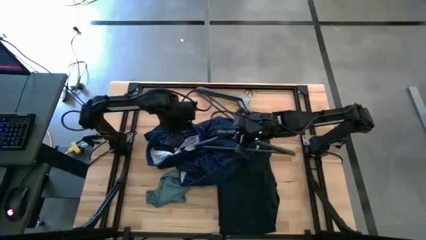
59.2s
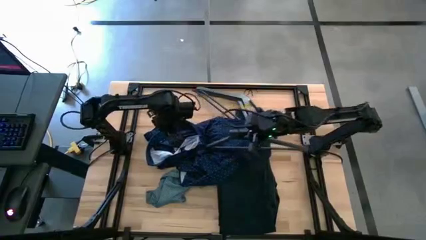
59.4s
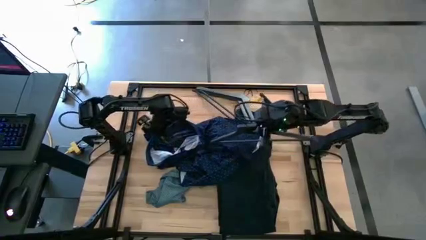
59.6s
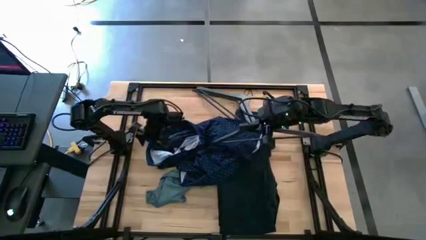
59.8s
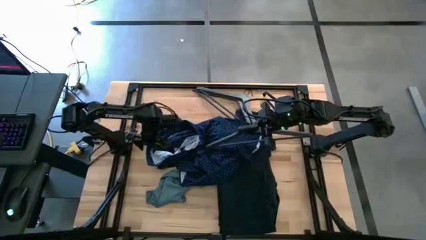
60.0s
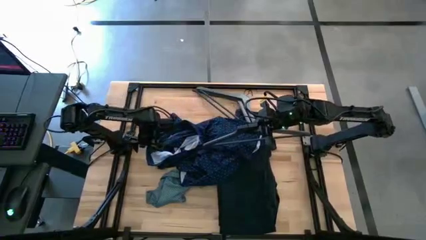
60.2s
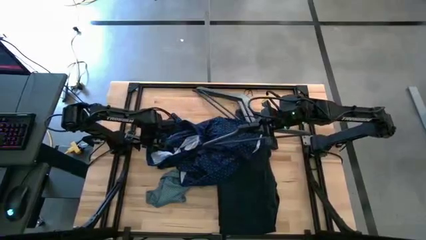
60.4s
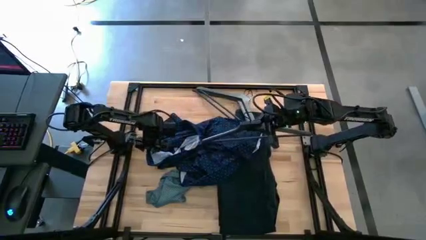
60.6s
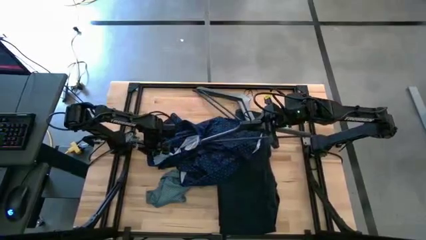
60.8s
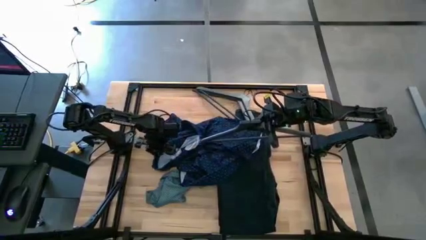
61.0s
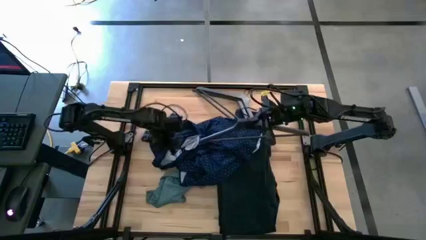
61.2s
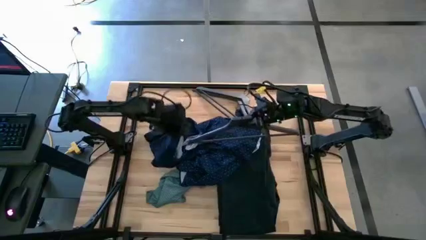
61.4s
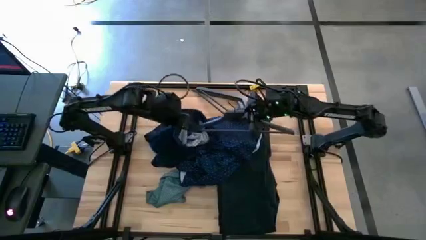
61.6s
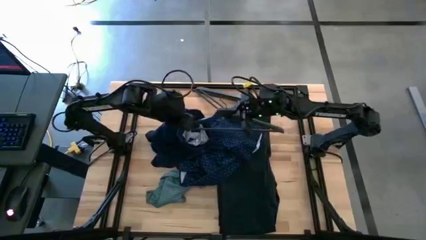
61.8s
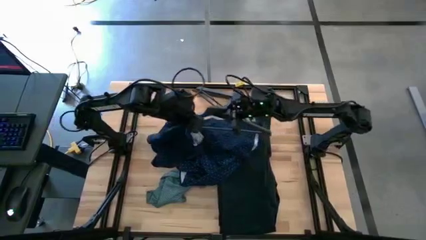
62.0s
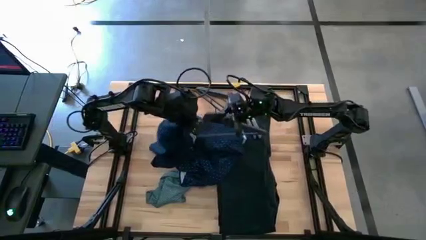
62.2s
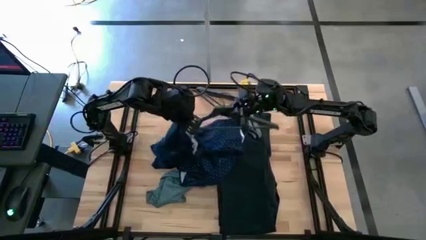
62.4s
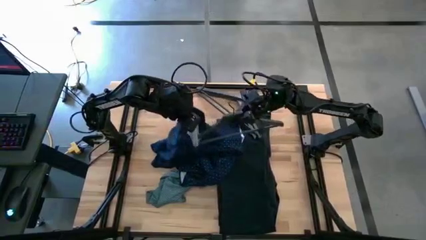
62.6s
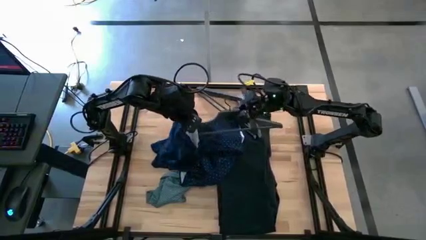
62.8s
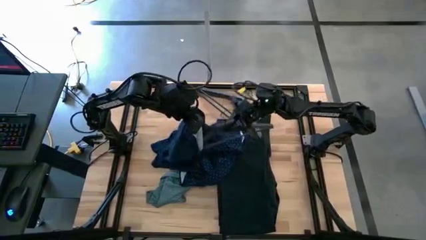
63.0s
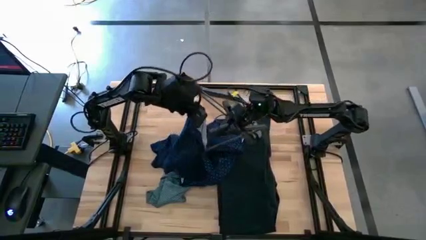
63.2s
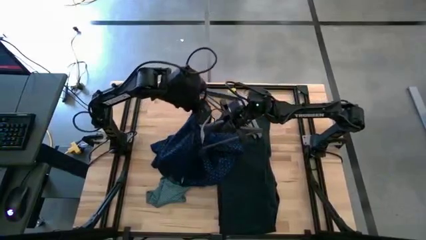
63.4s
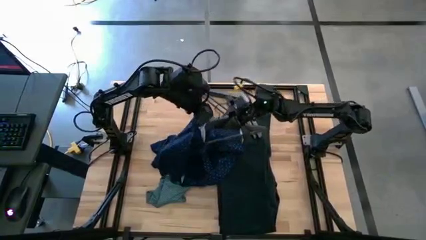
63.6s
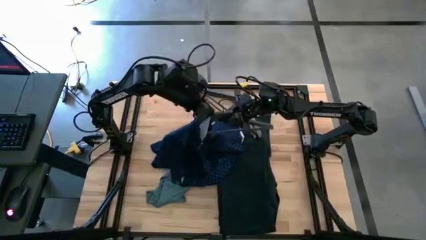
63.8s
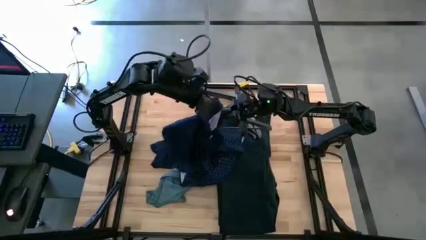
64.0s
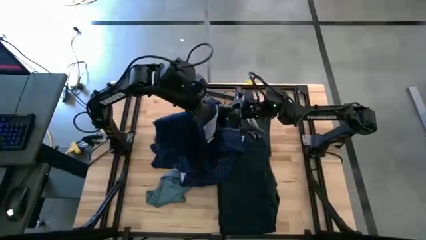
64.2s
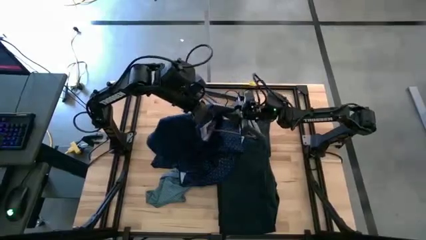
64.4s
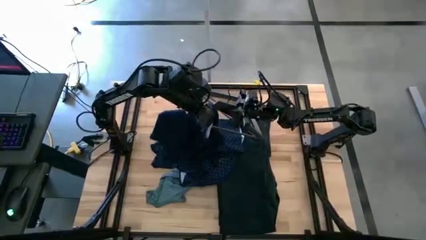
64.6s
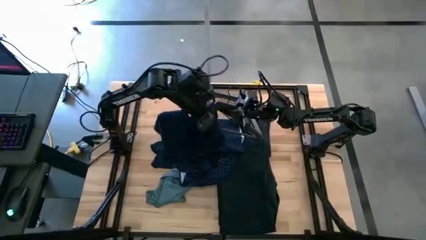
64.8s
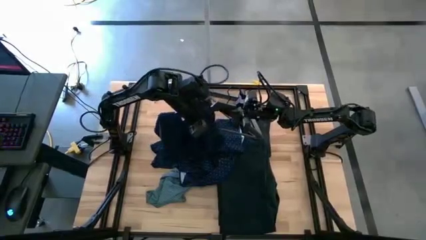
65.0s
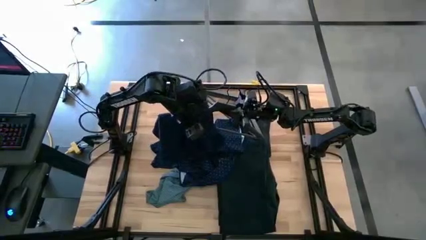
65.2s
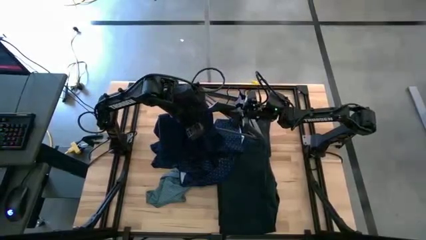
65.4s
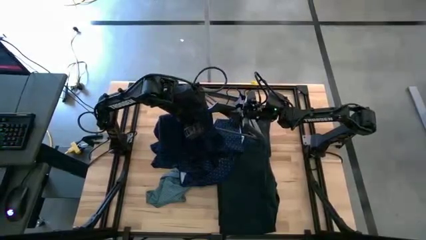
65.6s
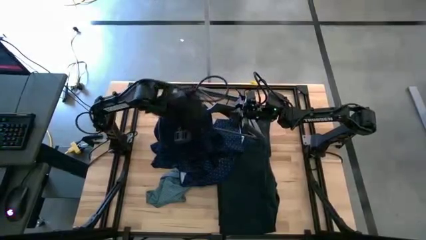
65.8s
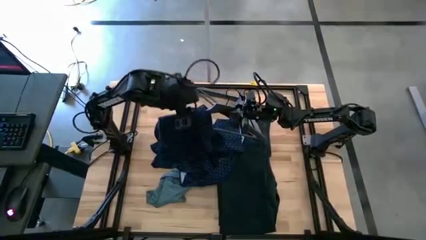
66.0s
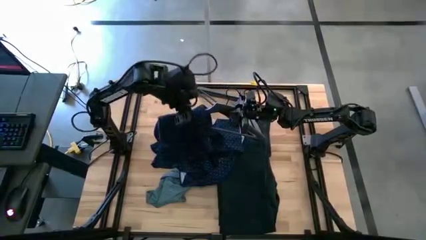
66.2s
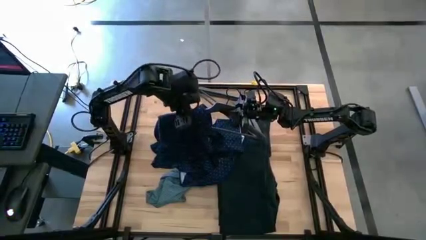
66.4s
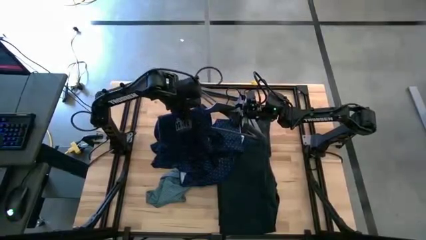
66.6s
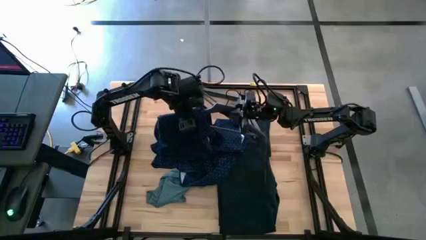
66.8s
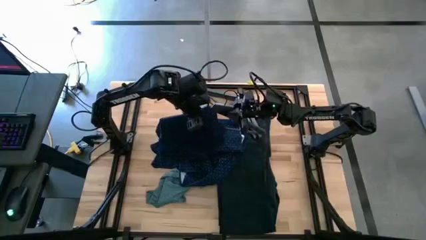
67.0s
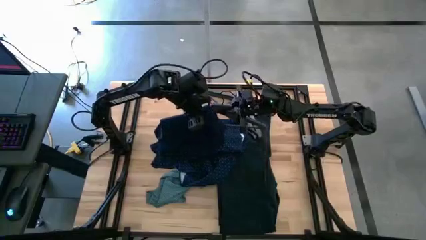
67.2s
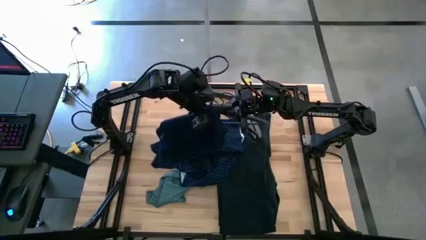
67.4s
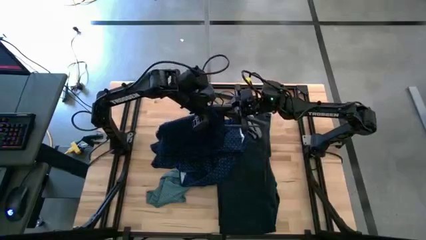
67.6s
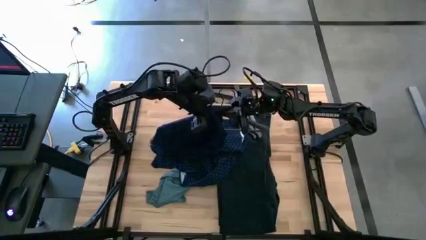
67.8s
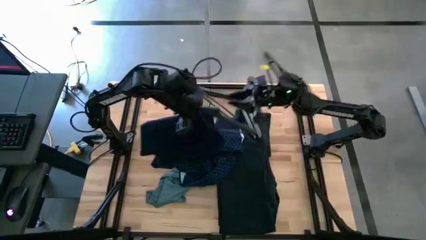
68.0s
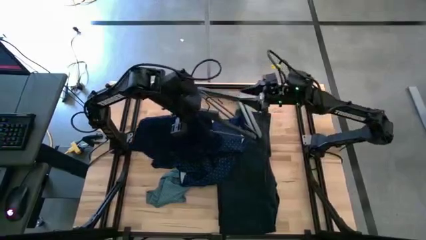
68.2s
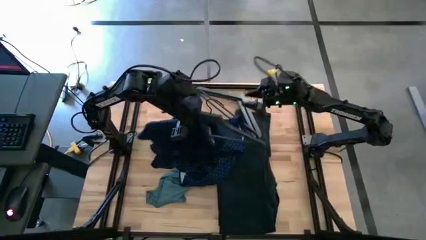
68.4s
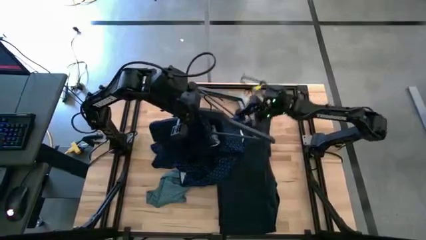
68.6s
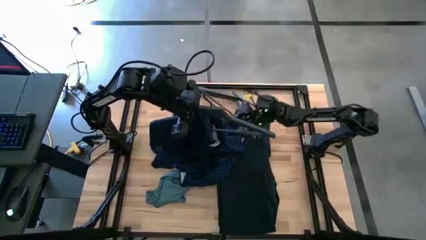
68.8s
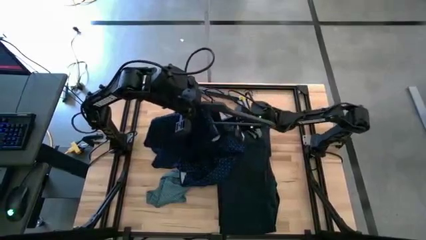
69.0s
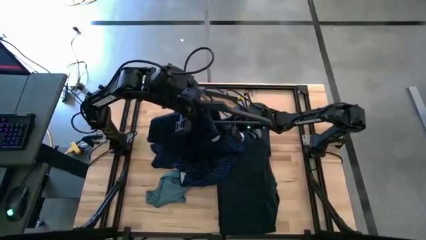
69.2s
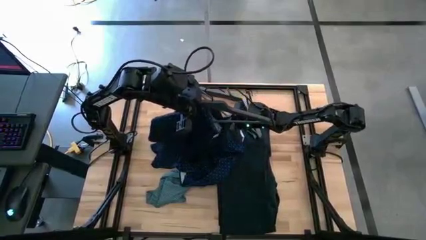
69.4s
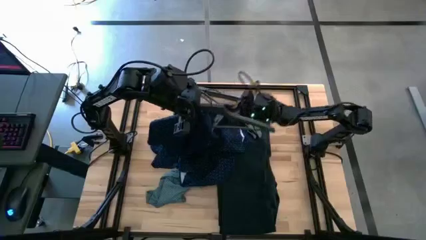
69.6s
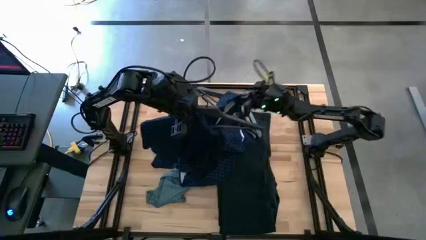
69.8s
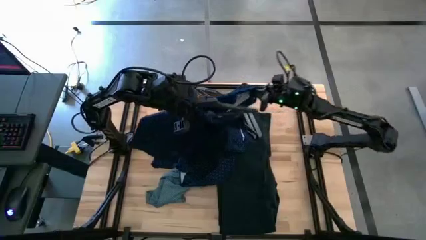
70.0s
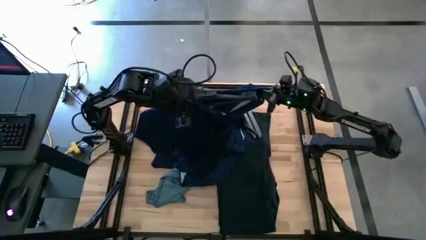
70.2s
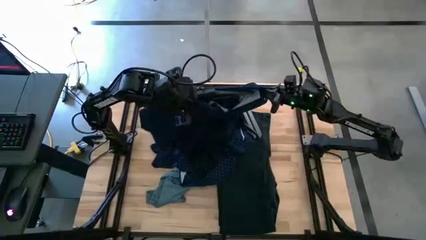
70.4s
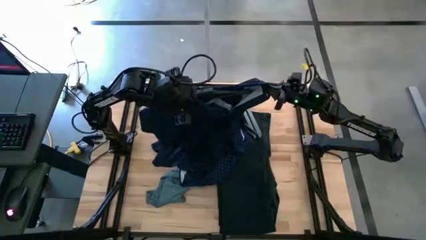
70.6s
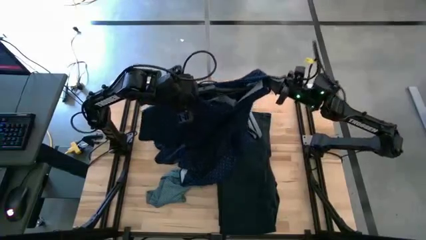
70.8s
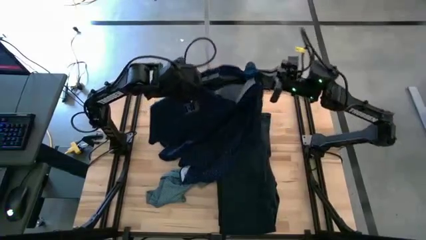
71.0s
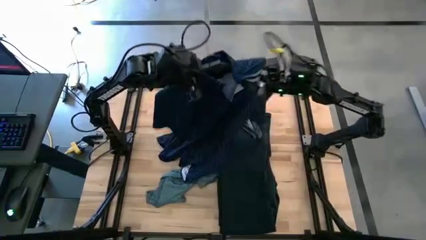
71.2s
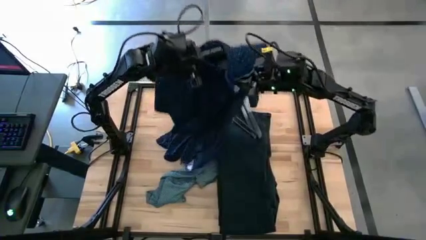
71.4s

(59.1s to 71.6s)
Task: Hang clothes
Insert the hanger into the blue polo shirt
